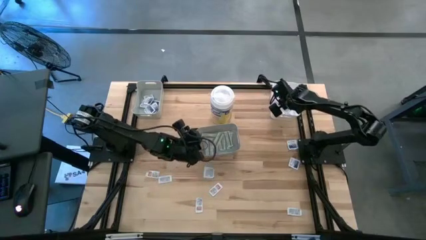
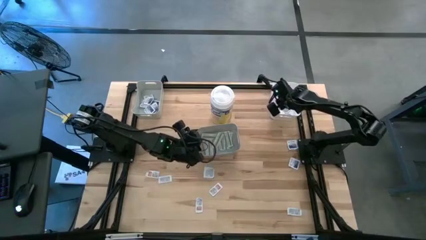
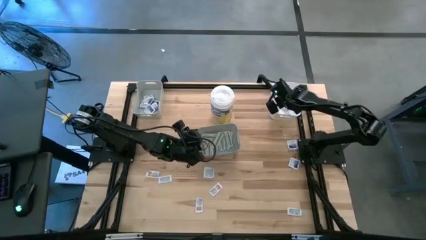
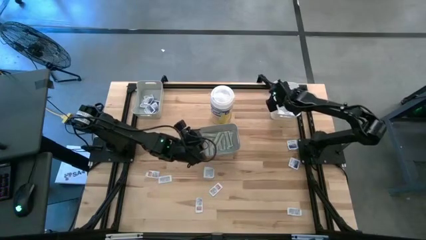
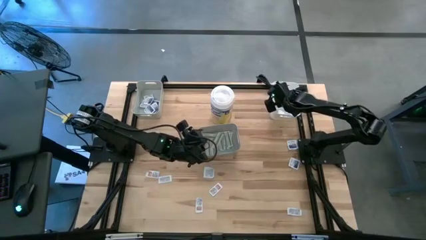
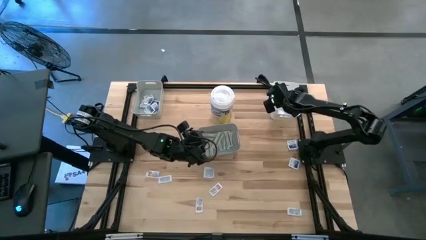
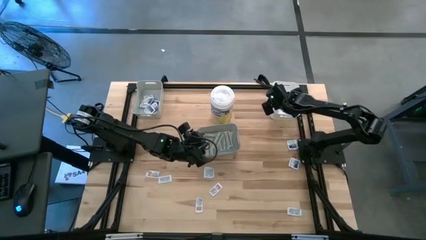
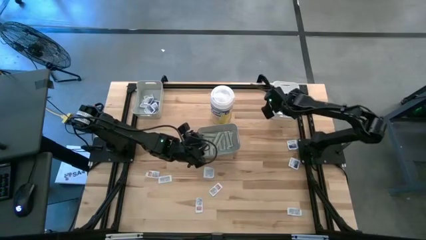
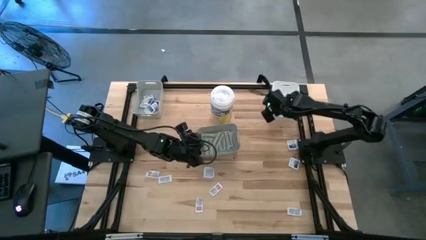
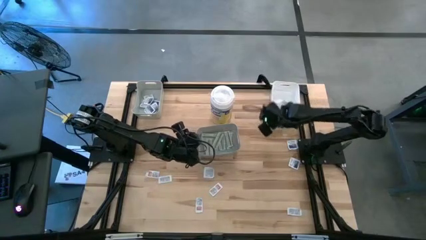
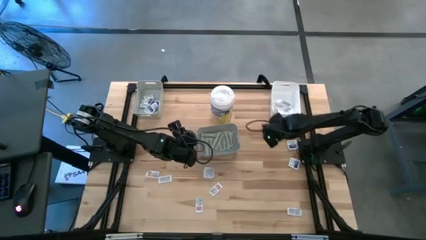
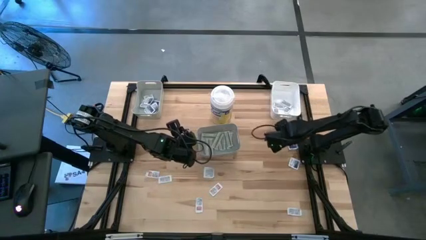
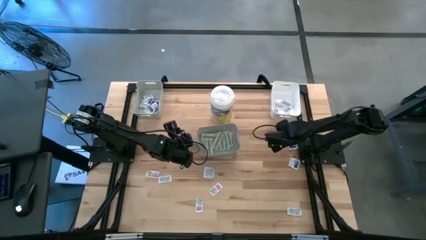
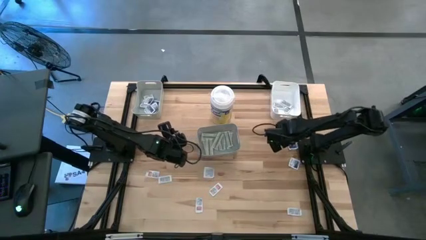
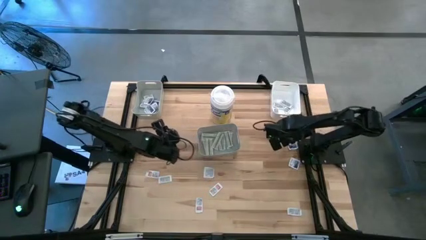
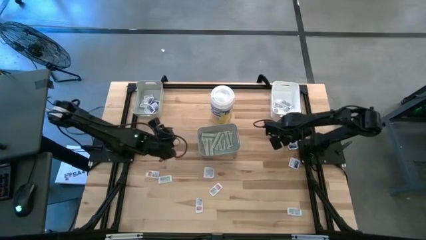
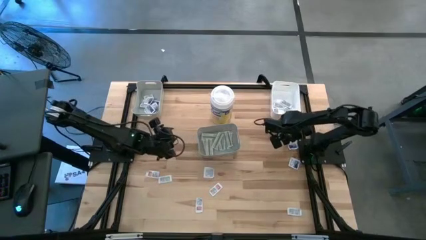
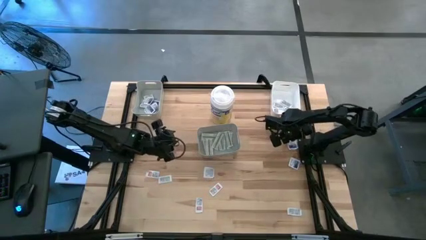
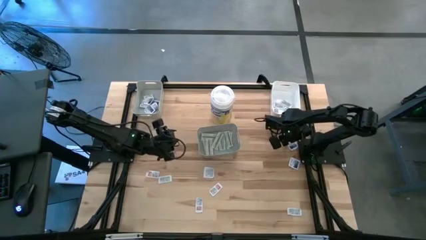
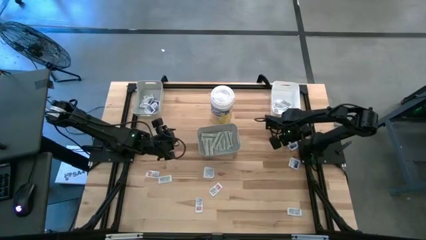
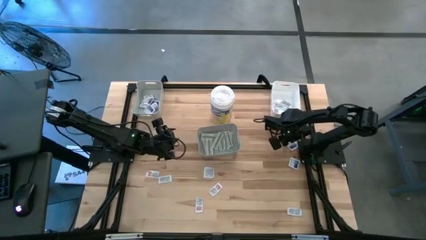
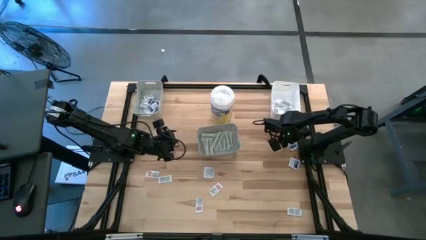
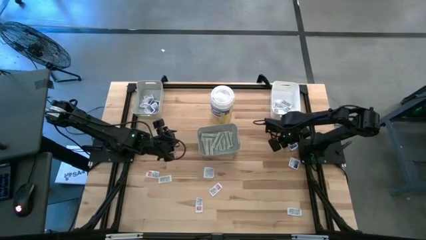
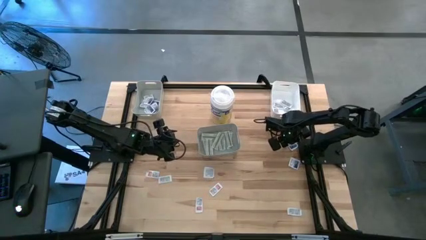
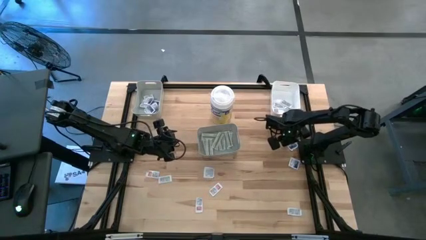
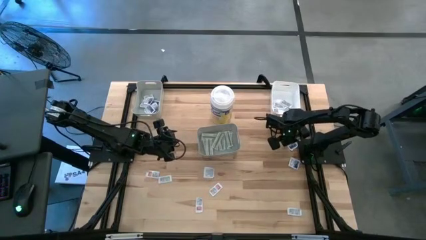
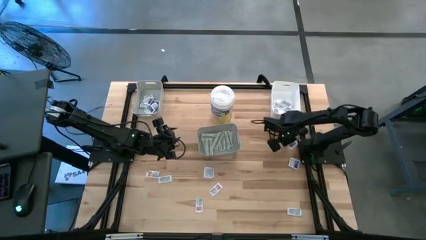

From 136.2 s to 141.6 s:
Task: Pick & Place First Aid Supplies
Put the alcohol pad into the top gray bin

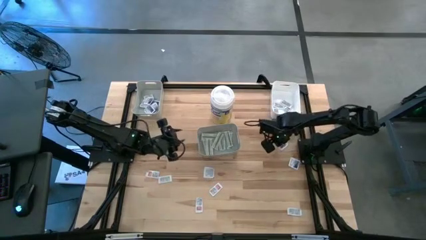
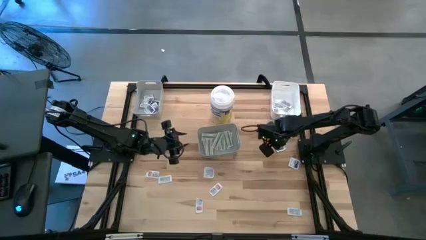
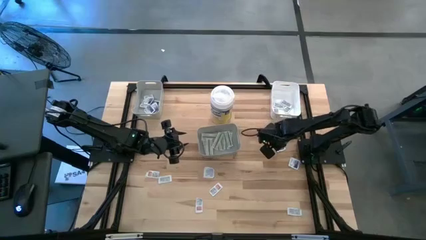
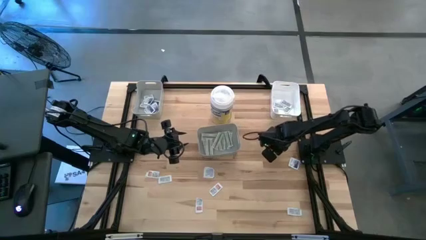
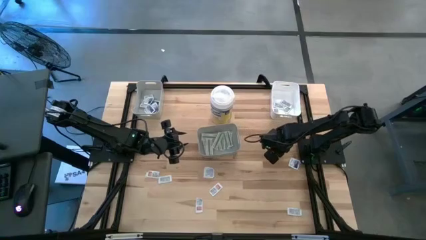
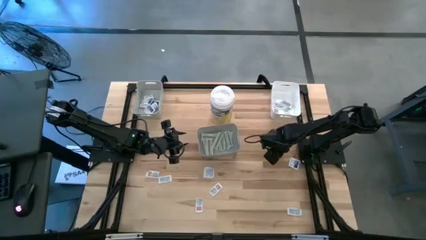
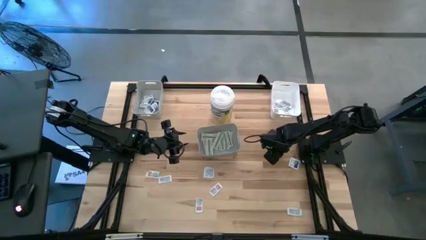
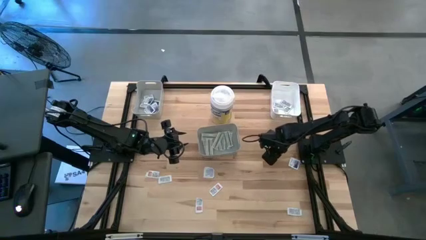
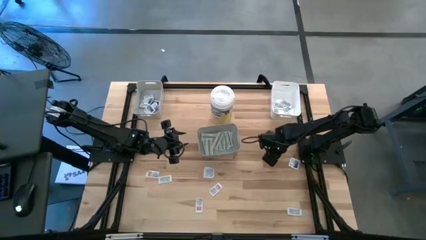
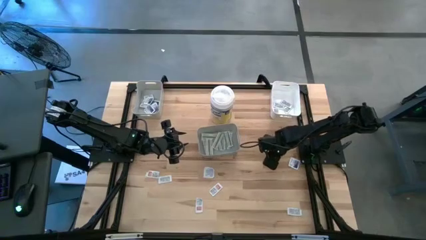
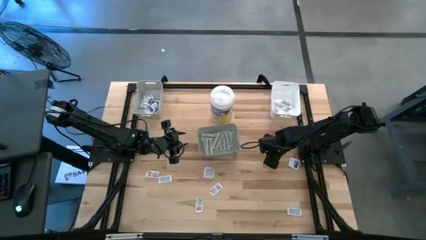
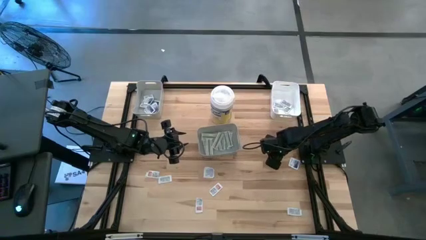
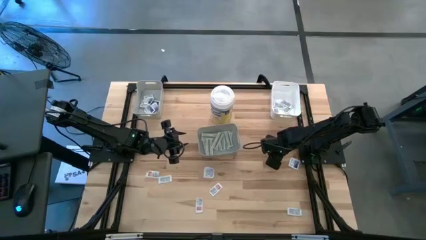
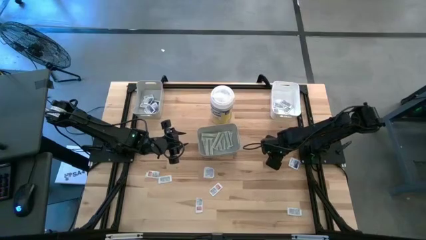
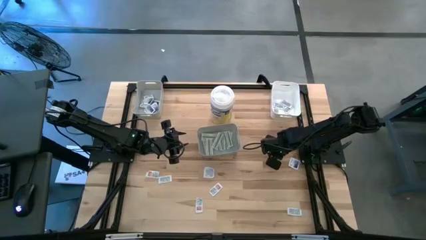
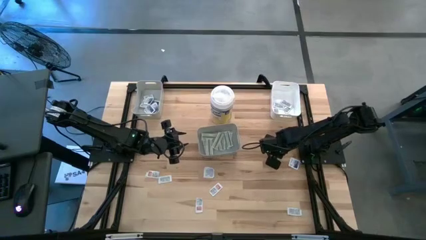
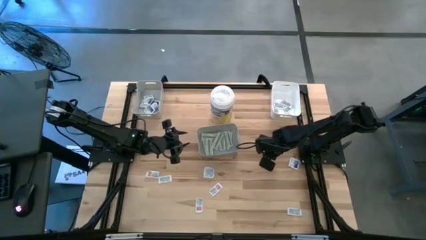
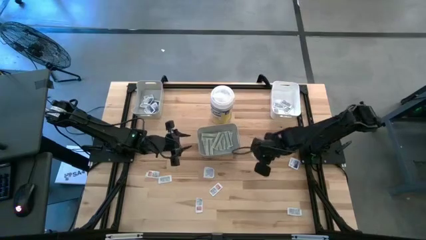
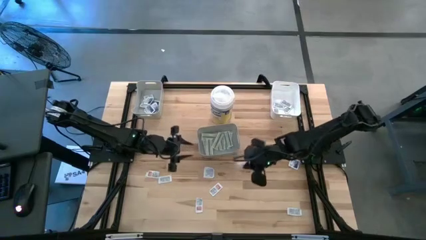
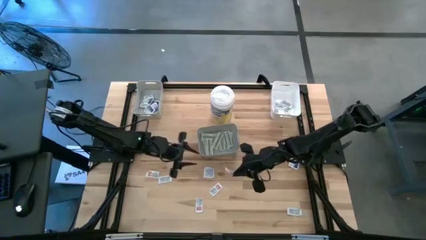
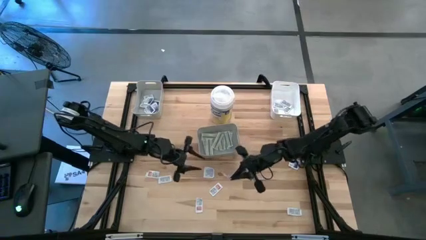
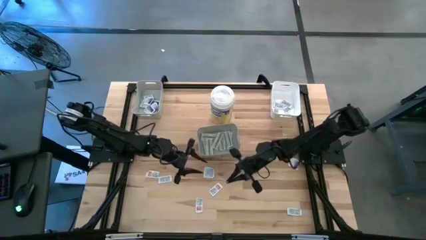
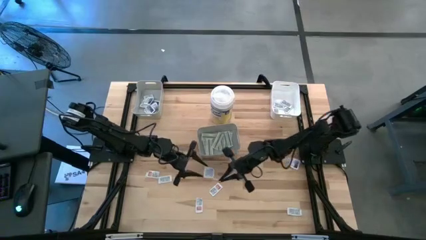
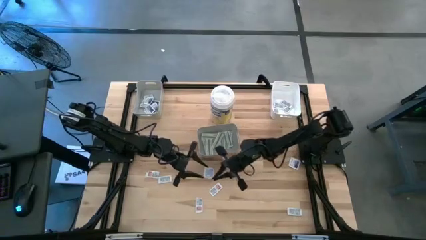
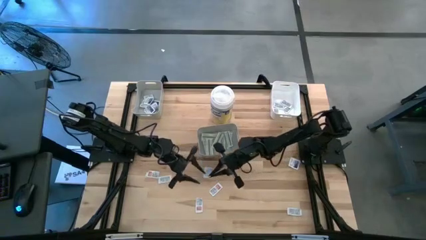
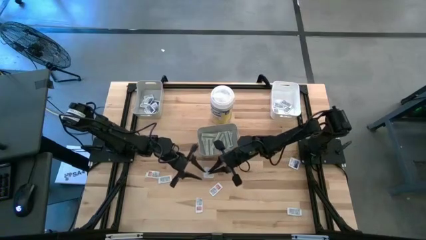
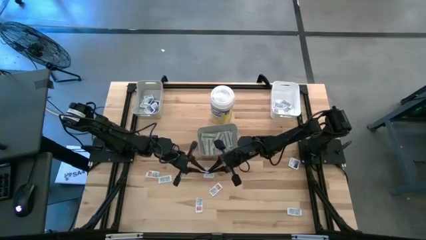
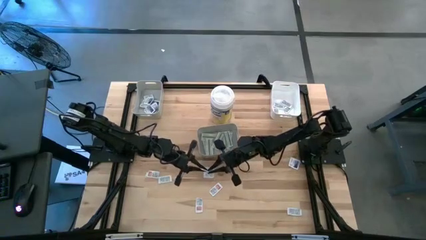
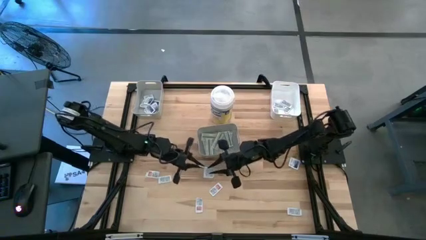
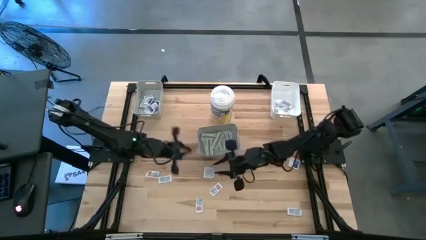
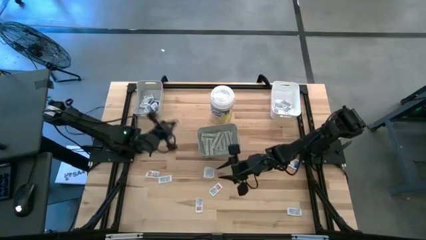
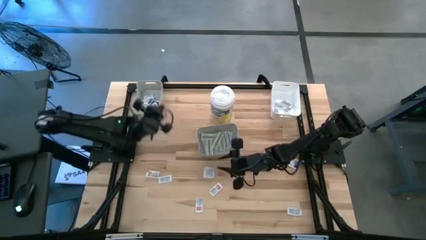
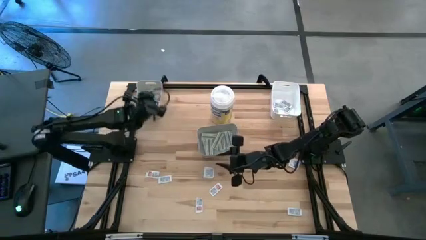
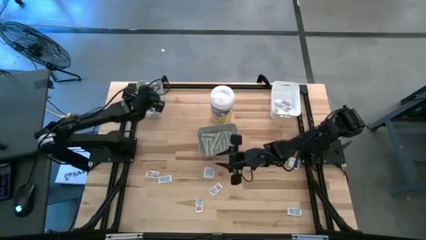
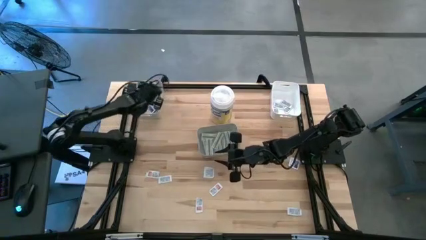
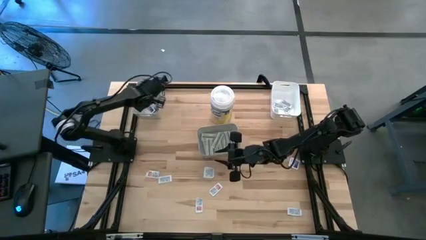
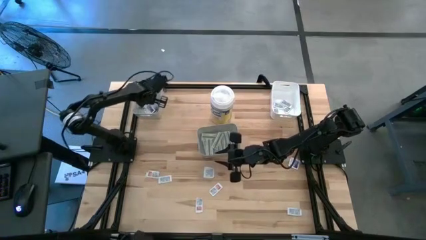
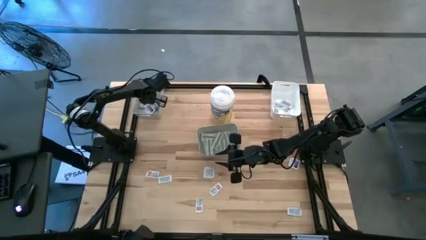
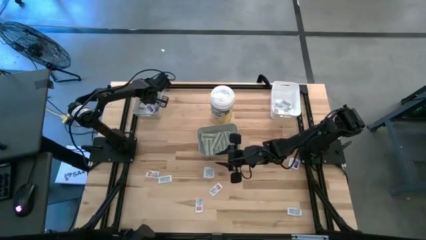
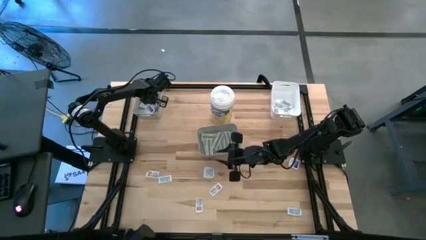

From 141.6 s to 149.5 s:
Put the alcohol pad into the top gray bin
